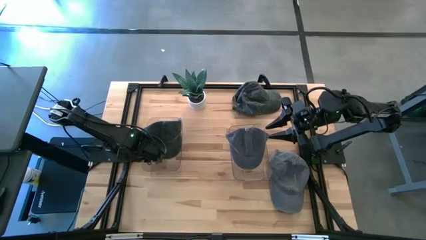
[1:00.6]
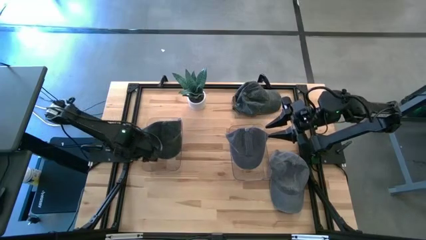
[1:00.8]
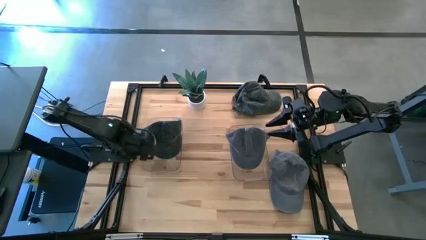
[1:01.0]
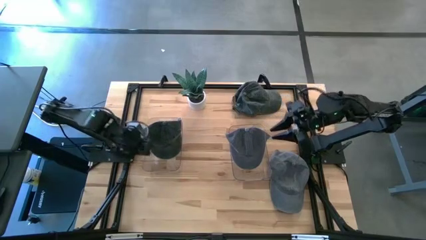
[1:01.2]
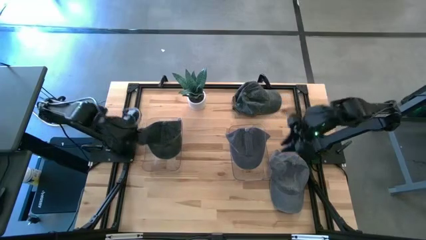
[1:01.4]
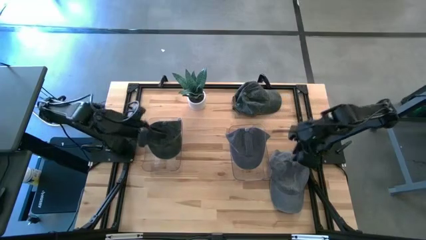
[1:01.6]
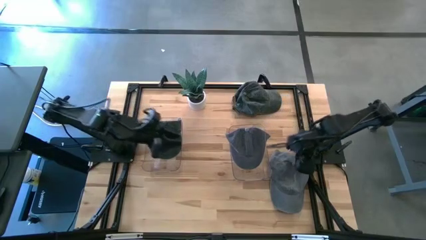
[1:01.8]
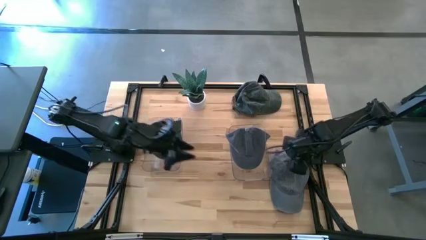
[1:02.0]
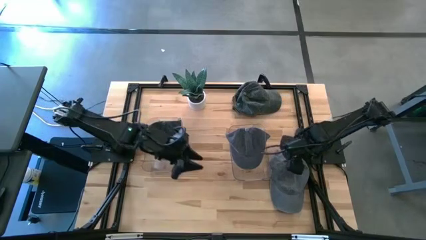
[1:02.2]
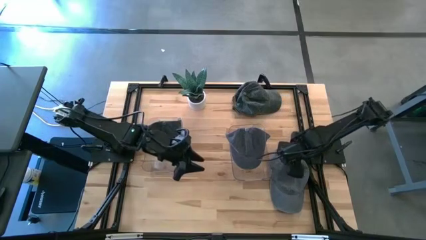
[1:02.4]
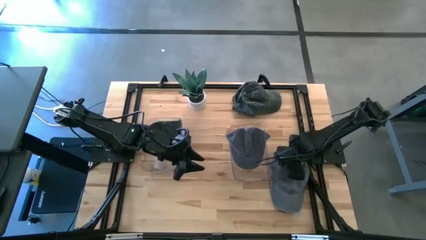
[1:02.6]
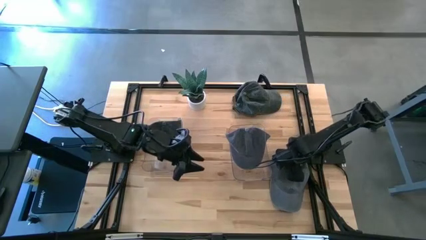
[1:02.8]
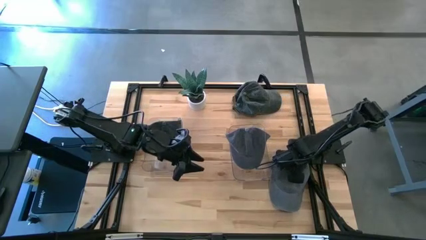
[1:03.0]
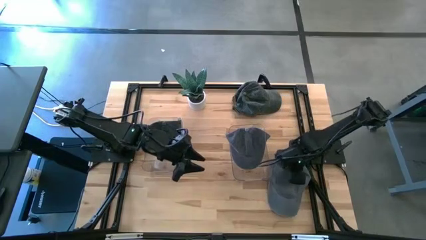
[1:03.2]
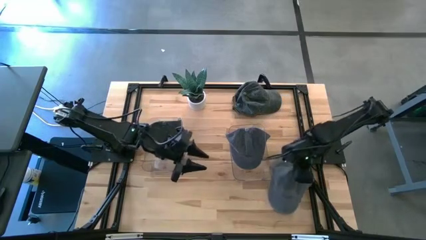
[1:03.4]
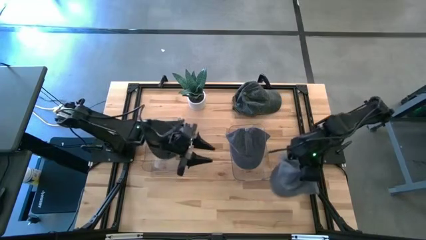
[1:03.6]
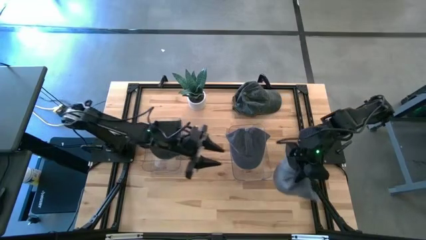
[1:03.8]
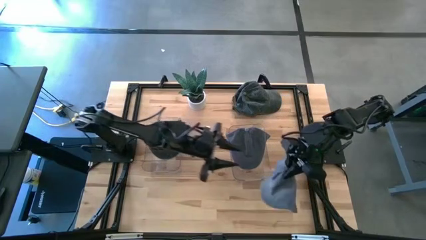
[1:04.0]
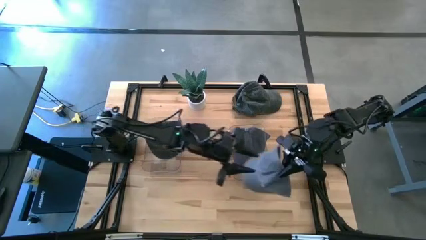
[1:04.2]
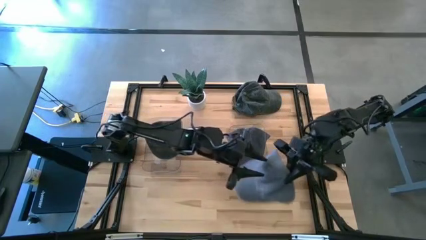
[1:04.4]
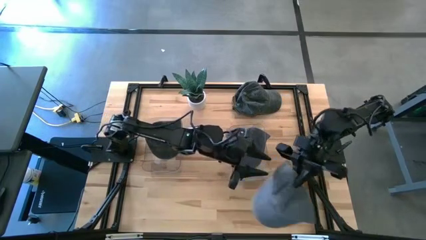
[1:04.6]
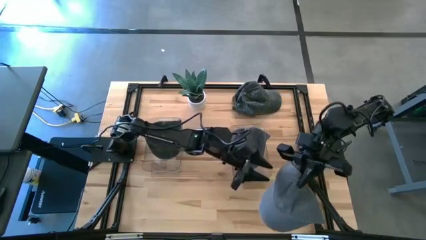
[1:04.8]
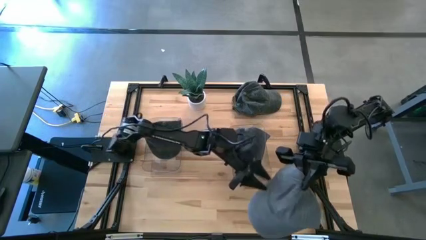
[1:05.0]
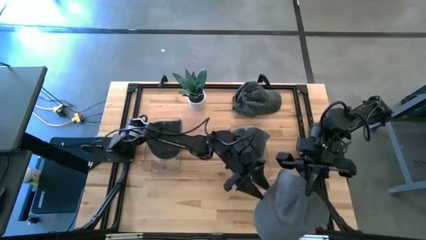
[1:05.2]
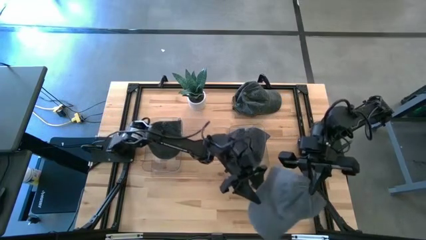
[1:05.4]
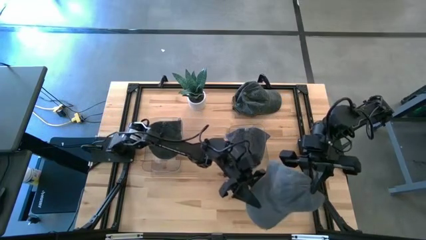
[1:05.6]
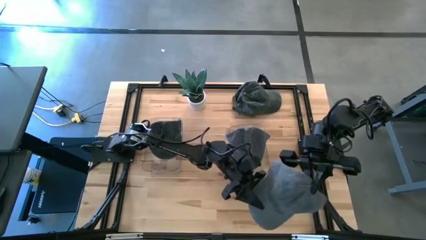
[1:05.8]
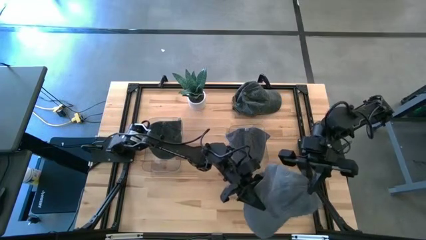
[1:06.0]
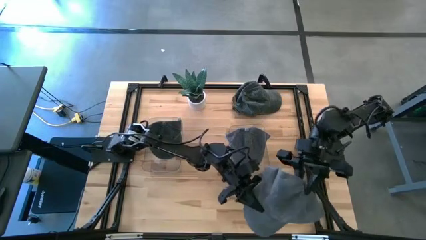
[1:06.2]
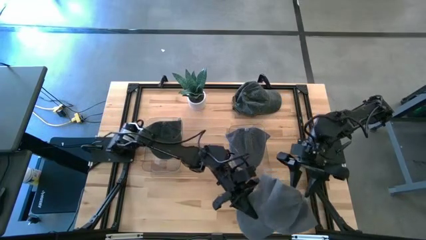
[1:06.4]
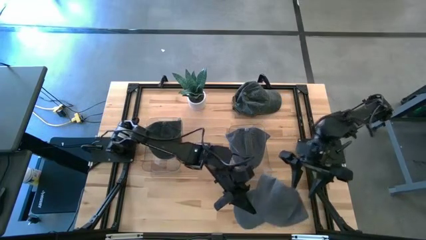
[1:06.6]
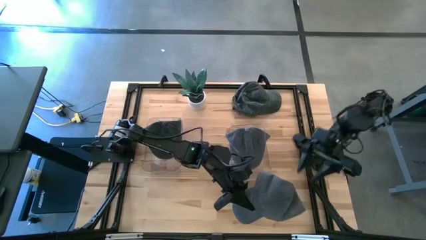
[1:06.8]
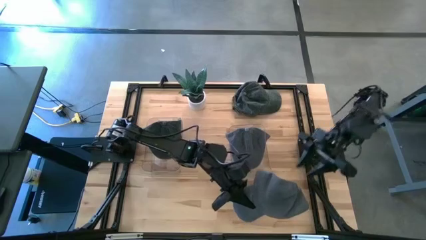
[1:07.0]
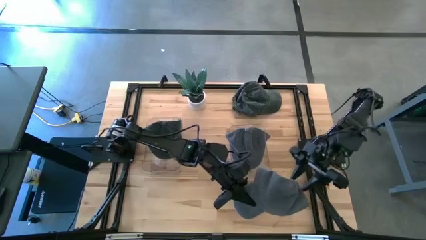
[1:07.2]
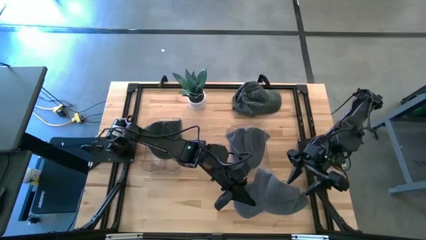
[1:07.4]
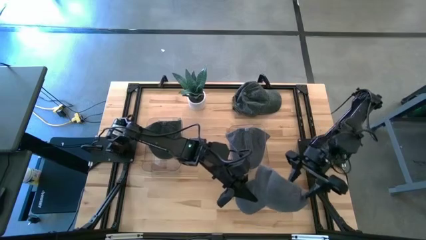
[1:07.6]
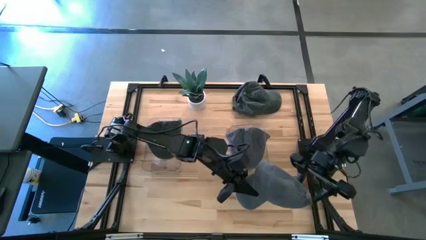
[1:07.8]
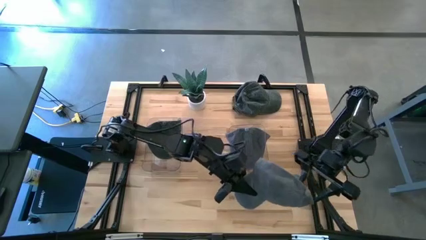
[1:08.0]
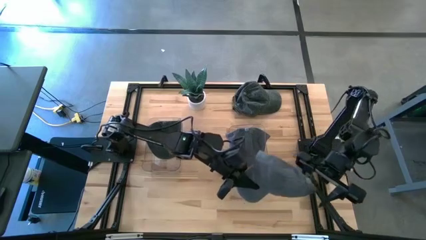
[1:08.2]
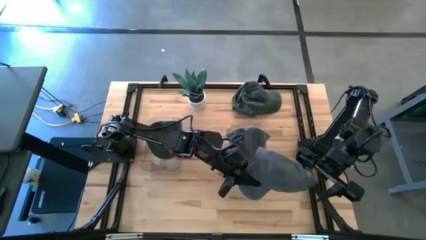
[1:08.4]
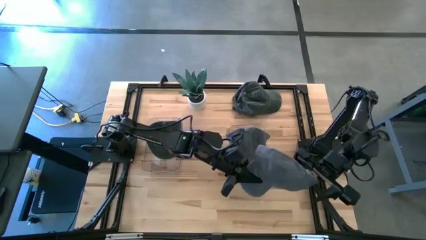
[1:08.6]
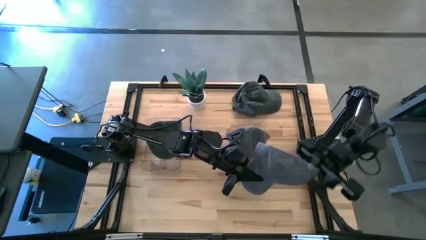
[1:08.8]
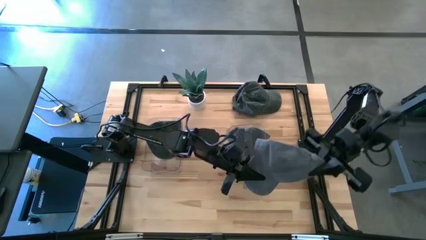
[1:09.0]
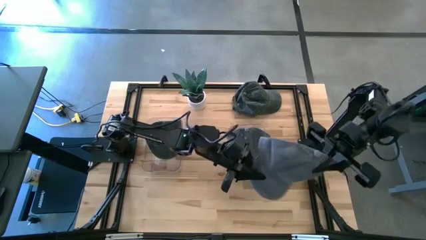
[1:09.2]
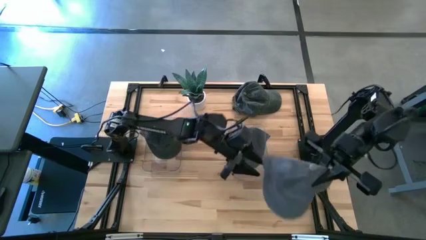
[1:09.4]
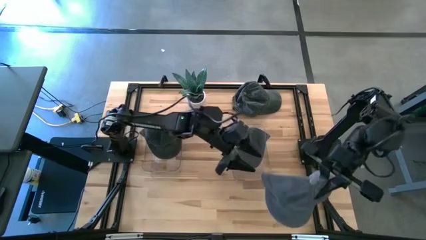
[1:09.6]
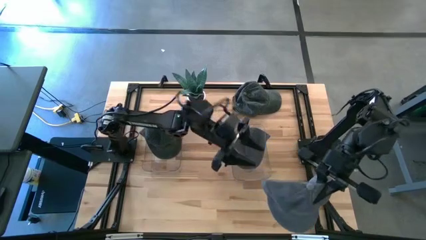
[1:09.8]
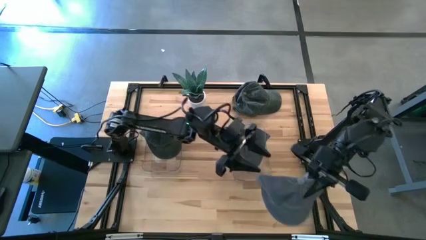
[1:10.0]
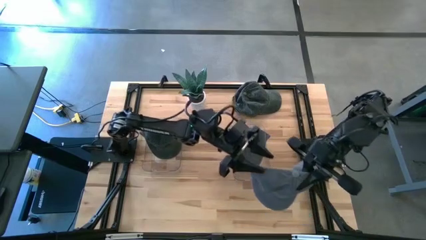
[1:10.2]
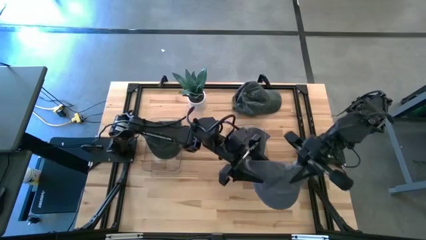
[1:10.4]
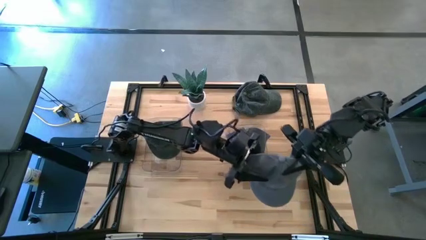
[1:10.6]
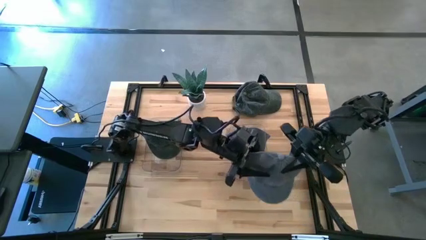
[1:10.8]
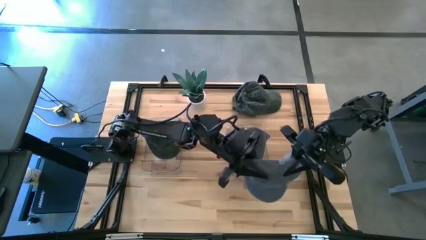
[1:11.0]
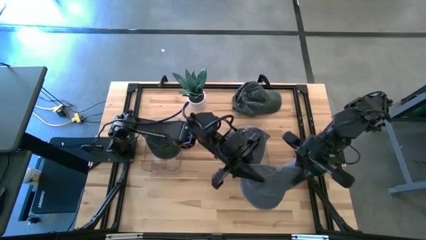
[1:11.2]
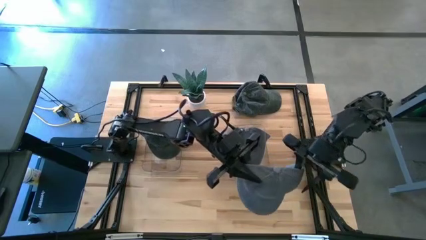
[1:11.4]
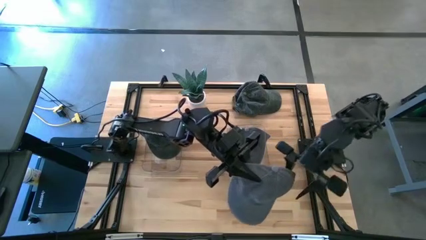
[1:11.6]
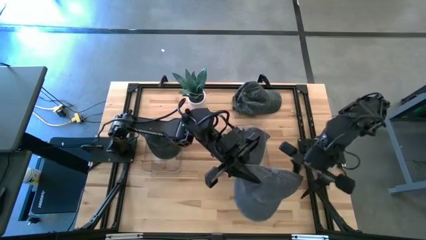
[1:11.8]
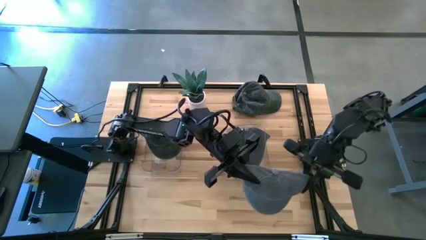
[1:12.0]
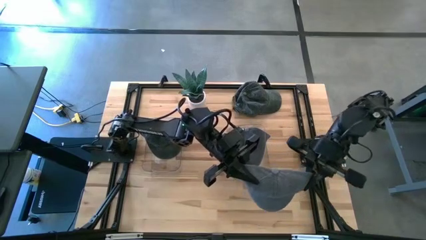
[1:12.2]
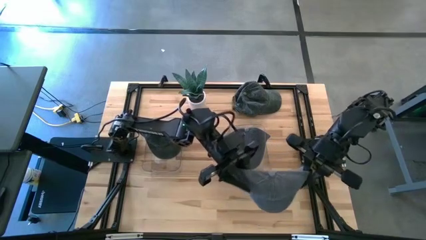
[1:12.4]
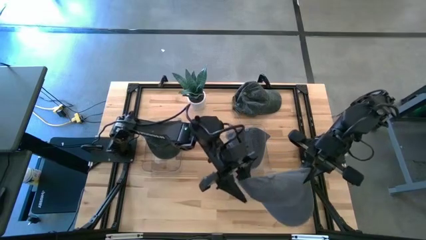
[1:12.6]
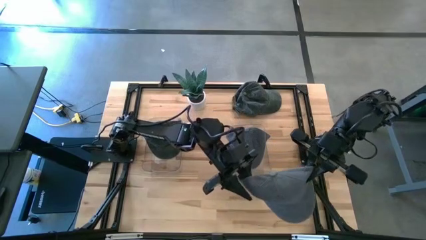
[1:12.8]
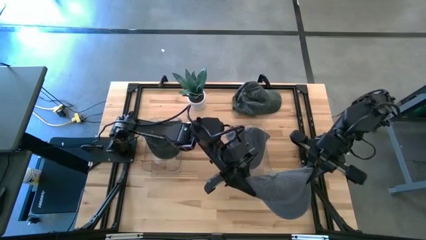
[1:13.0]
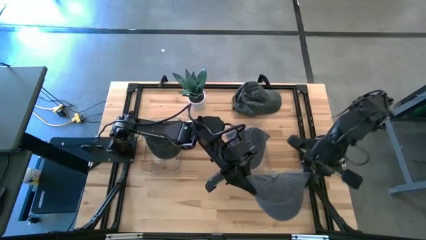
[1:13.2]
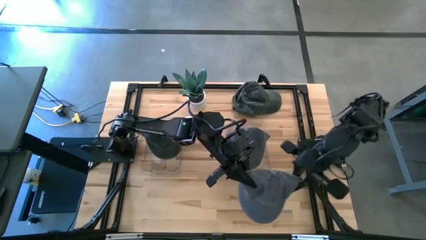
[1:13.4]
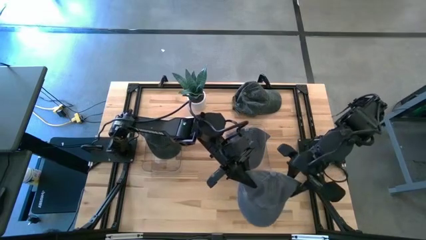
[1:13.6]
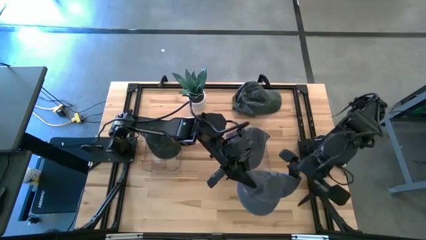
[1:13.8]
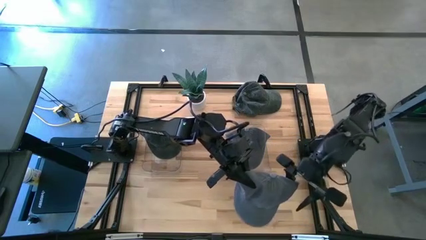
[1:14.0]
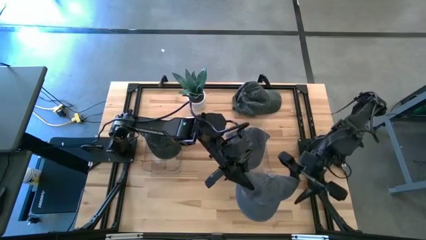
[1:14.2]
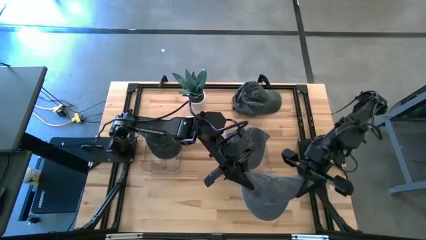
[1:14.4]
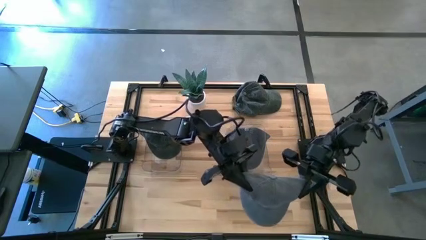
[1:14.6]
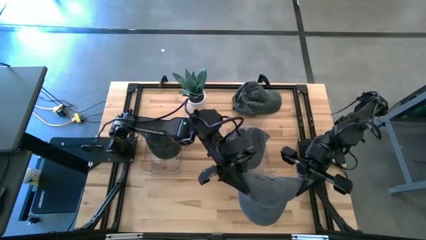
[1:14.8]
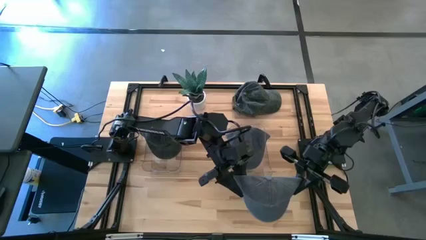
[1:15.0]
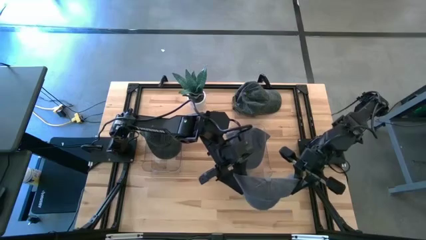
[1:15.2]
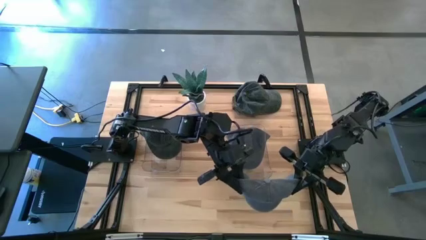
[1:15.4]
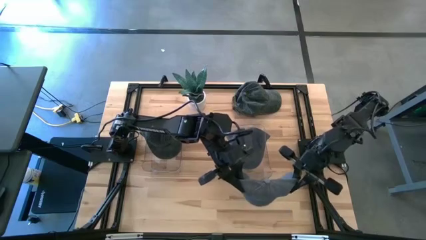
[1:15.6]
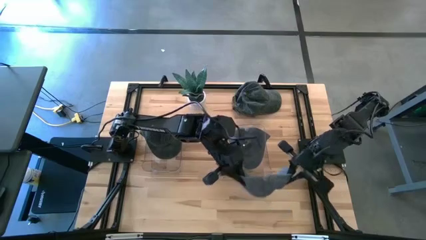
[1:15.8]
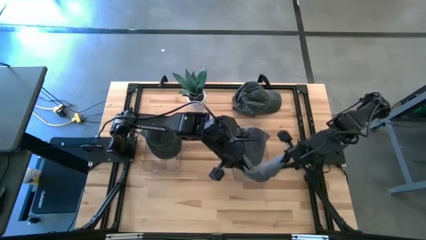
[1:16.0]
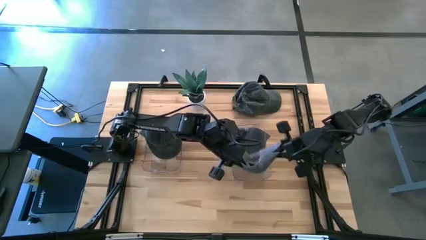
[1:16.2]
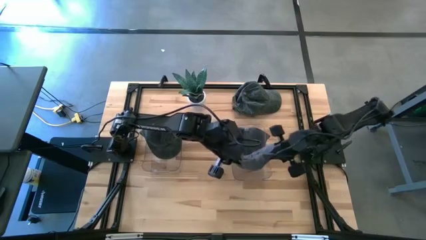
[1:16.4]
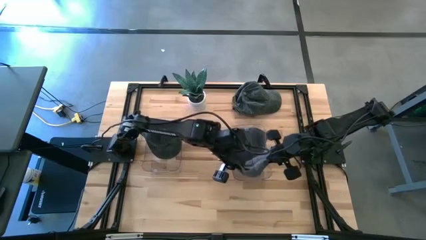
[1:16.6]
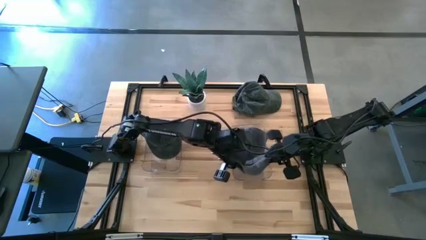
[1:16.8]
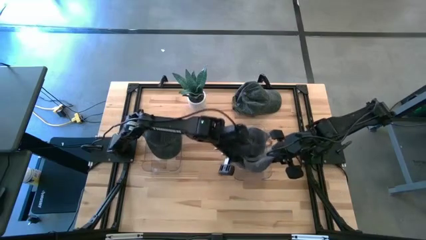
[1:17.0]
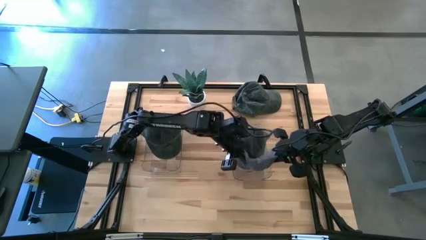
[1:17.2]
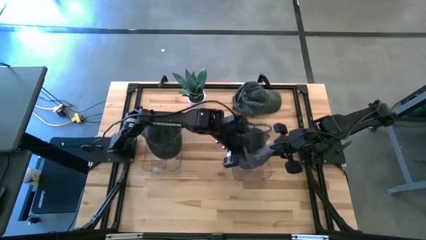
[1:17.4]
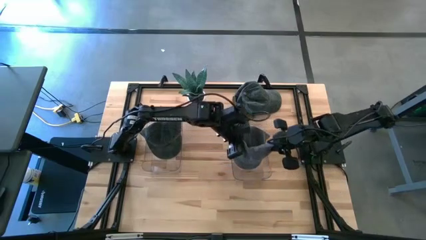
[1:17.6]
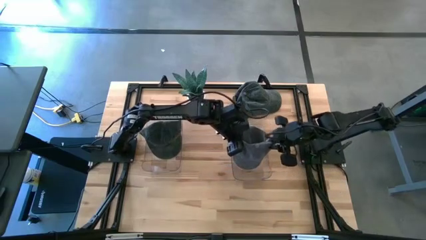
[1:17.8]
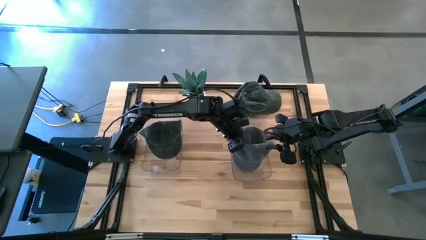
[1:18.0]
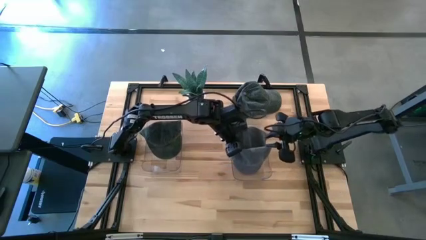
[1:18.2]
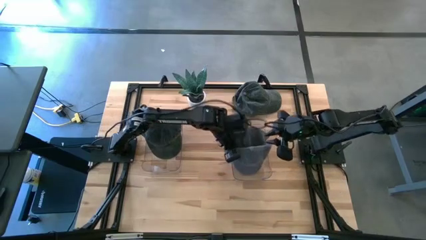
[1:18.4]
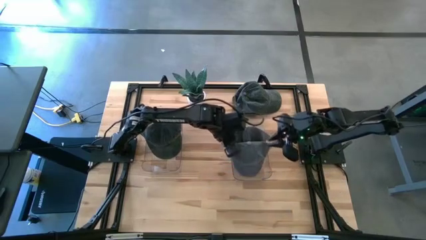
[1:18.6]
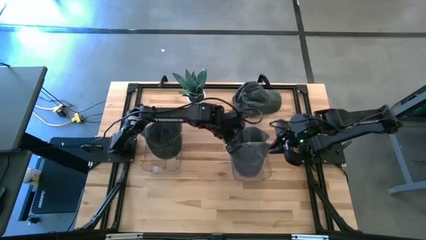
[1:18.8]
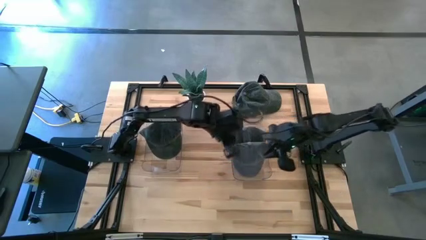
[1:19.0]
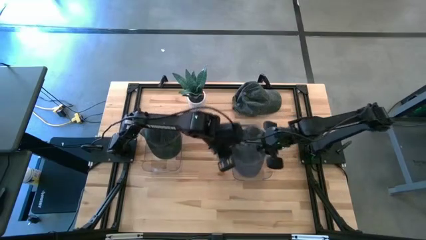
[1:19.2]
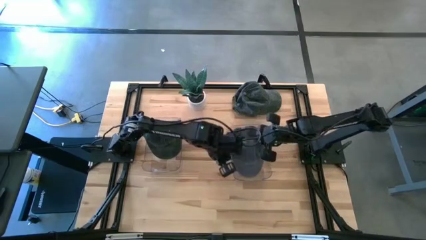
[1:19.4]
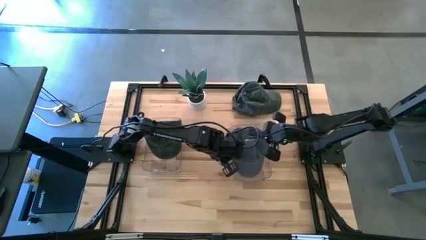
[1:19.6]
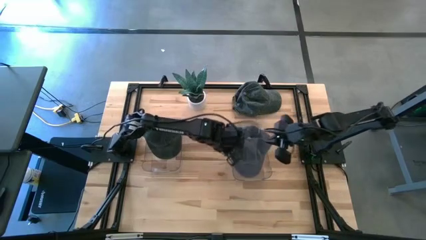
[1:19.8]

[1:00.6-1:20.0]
Task: Pick & Place hat
Put the gray cap into the right transparent bin
